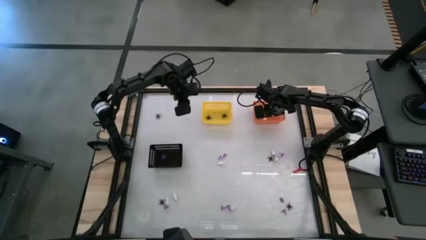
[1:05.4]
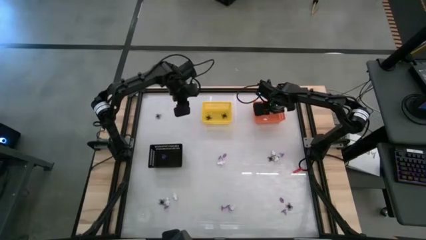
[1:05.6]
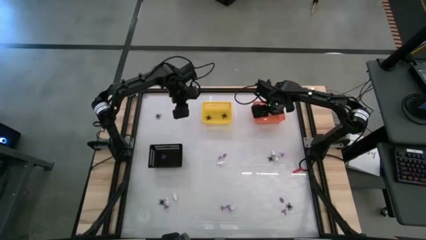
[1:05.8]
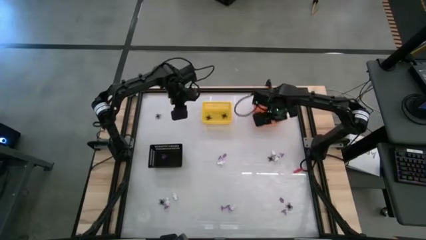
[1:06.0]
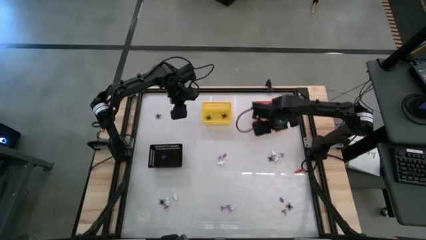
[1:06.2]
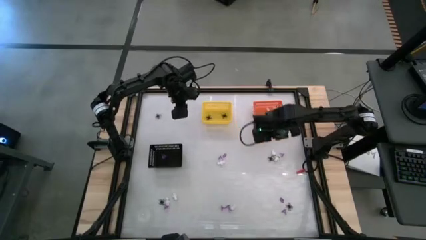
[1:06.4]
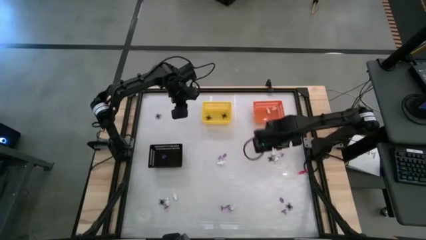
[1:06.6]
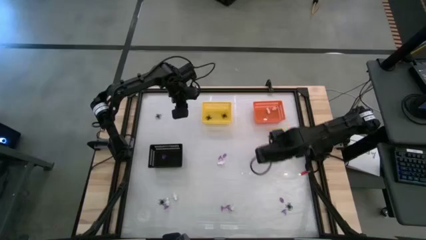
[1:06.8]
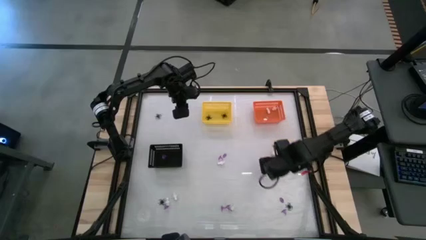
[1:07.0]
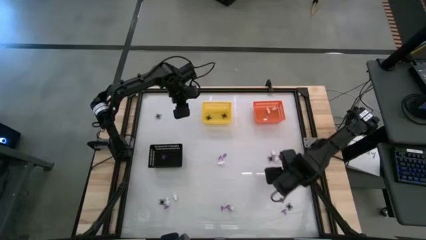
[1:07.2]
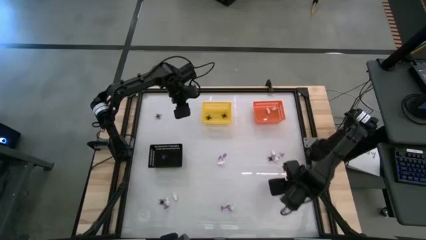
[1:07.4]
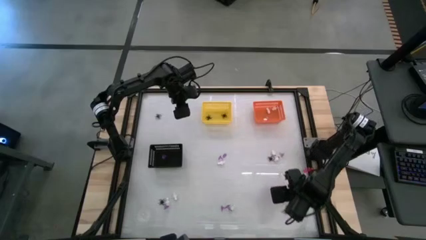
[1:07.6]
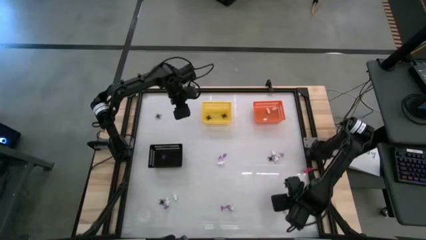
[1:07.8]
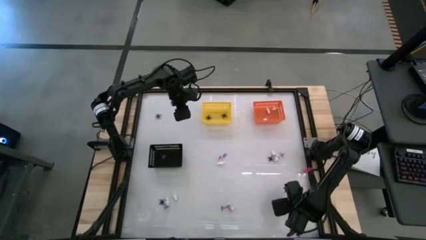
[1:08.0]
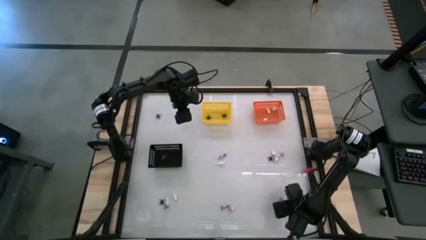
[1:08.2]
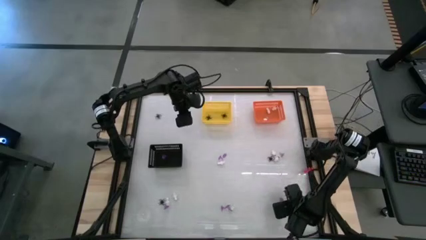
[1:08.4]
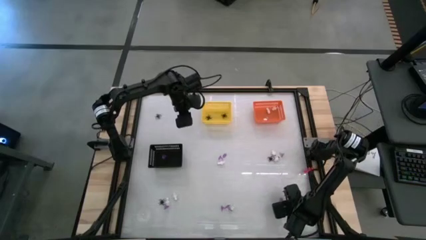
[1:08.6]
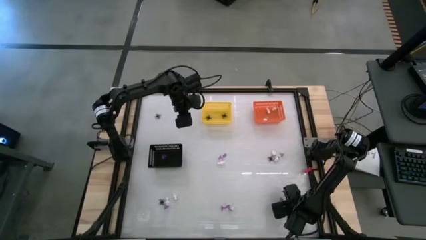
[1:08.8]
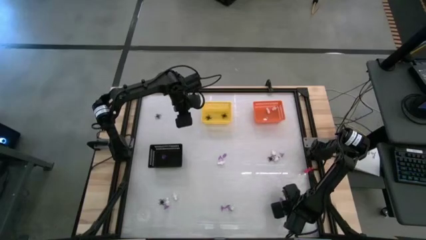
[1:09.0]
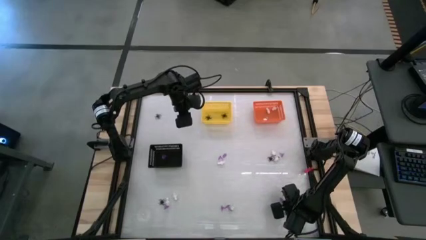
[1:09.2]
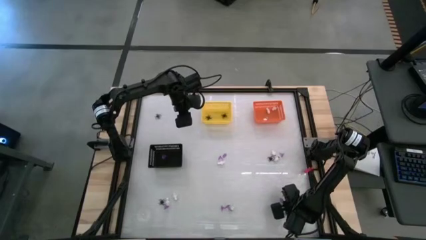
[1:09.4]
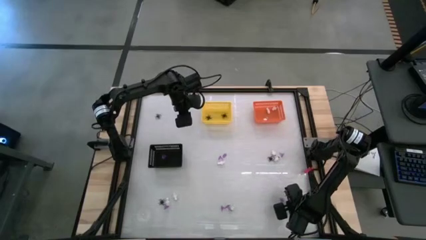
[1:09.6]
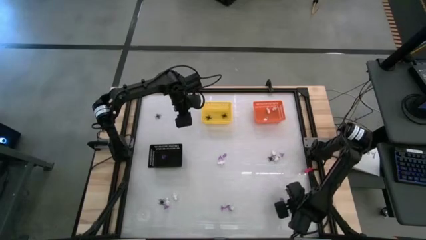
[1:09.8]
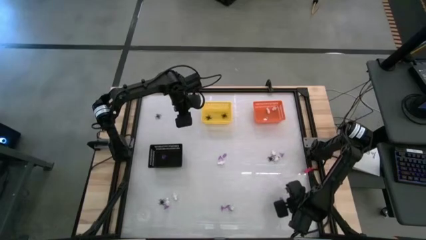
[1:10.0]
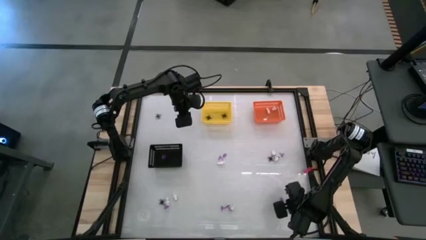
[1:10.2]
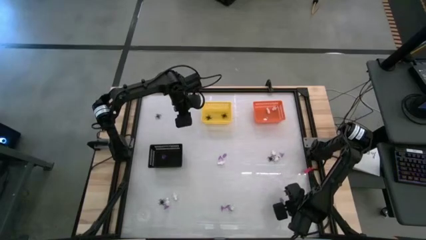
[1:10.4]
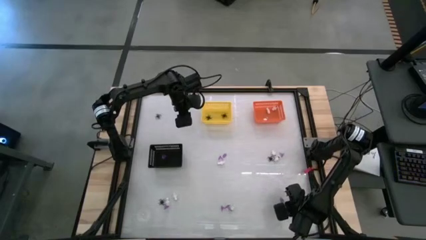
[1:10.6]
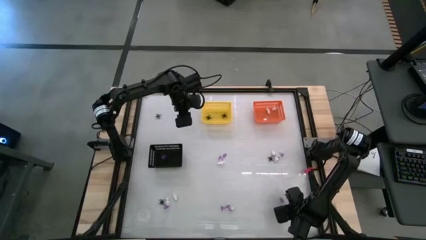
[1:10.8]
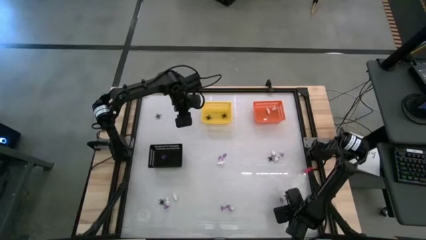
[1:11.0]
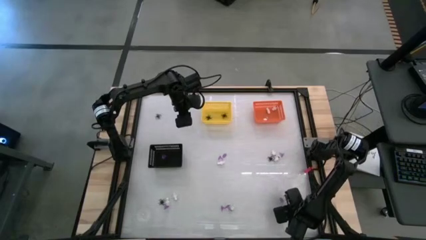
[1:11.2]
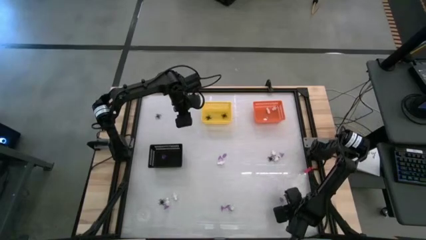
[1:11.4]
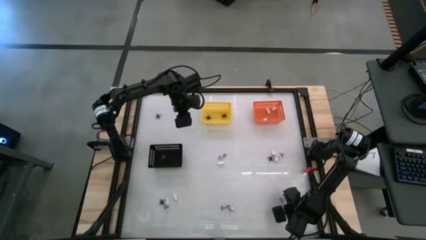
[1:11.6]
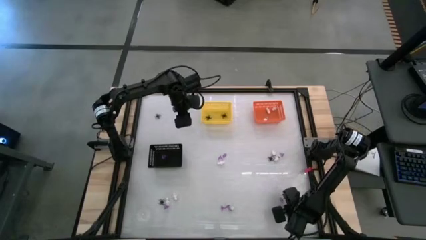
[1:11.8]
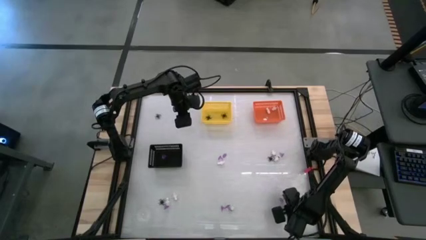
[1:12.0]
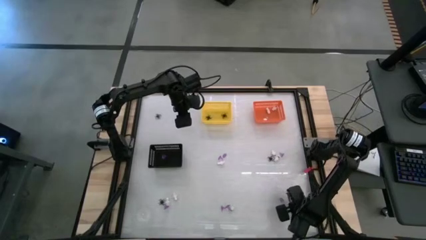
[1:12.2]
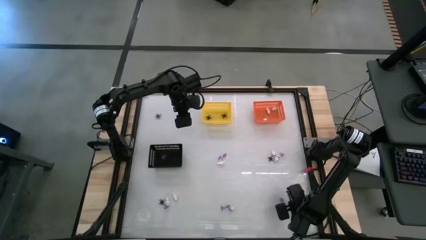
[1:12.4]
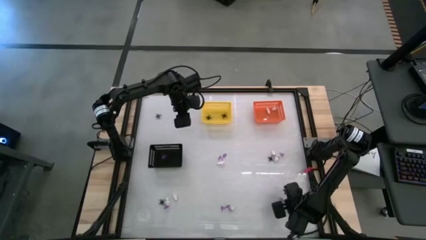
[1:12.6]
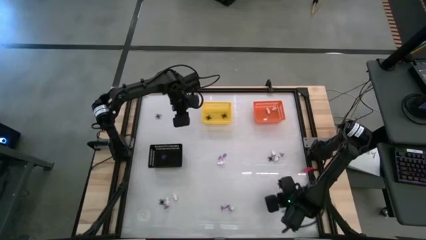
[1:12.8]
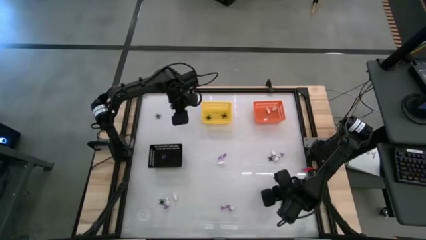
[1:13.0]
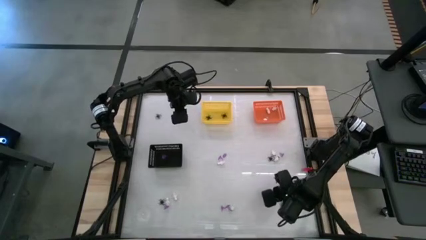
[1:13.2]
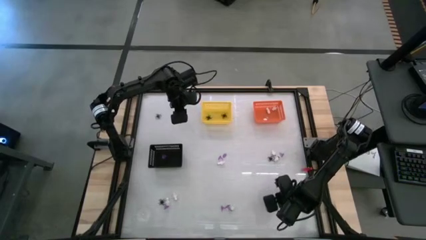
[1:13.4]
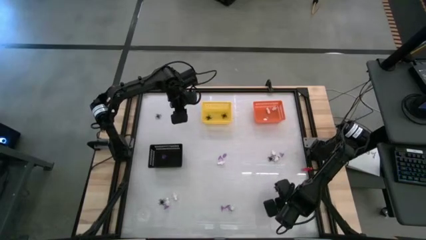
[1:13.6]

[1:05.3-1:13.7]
Task: Sort Halloween decoration
Put the black spider toy into the yellow basket

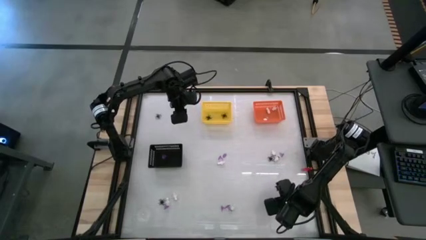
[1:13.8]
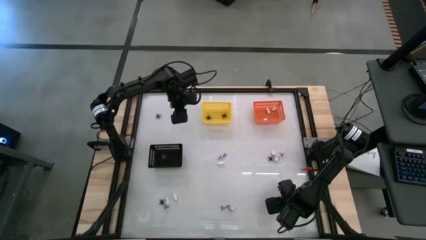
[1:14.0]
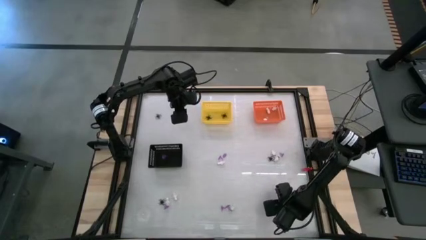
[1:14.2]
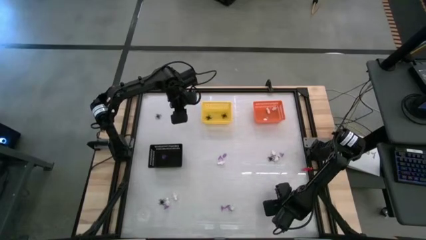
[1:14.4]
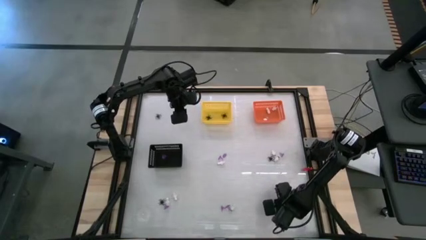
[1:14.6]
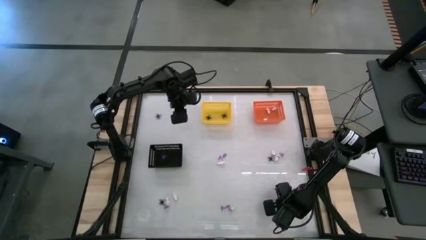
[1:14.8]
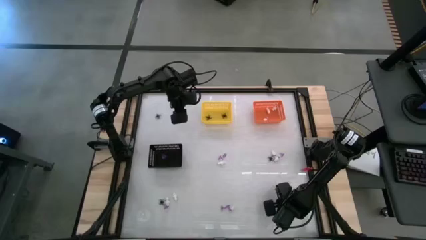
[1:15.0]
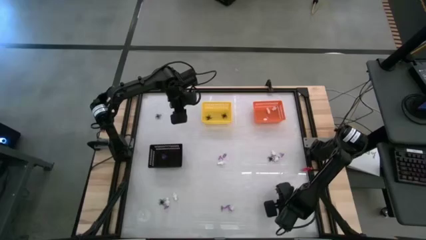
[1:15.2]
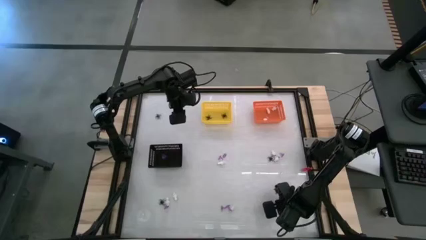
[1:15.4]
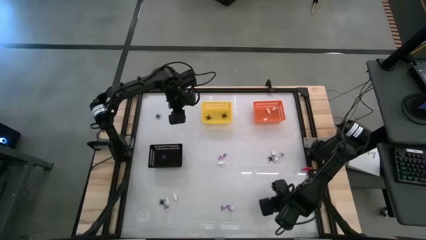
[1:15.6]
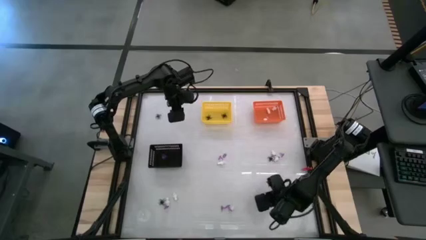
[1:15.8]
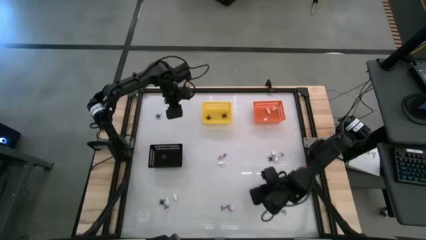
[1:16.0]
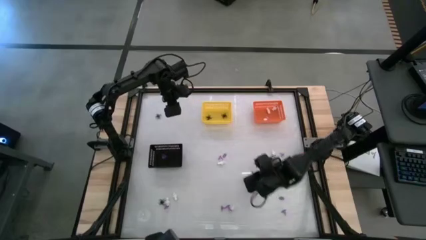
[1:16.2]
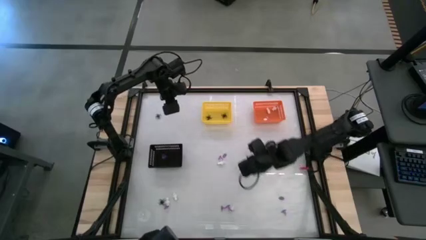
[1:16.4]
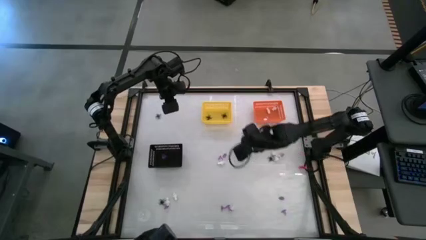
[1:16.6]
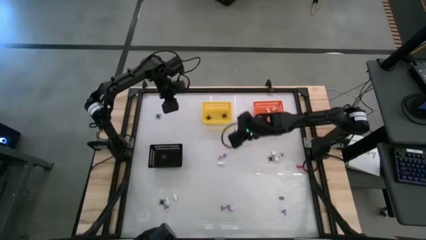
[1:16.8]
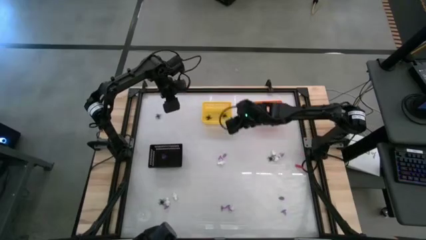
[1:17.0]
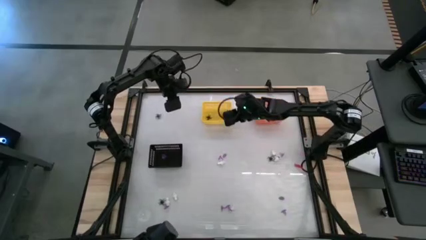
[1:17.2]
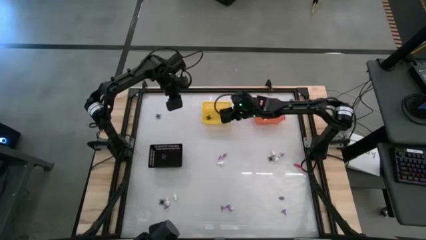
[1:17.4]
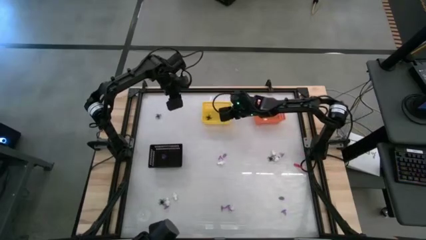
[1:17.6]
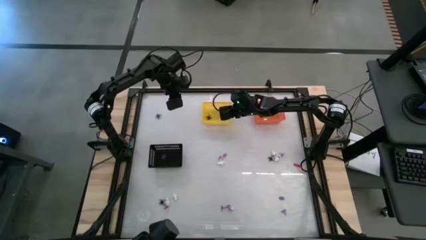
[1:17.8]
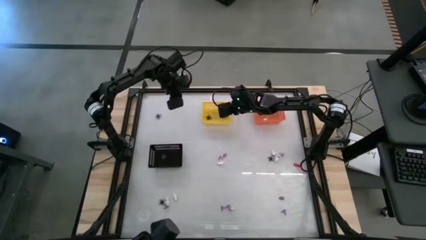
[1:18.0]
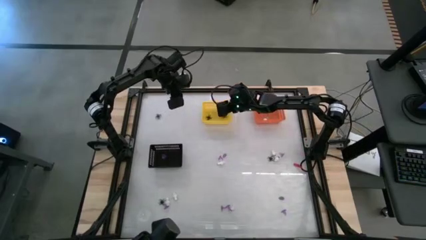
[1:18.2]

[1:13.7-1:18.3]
Put the black spider toy into the yellow basket
